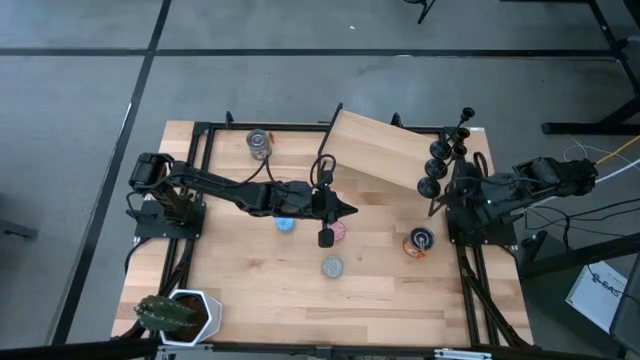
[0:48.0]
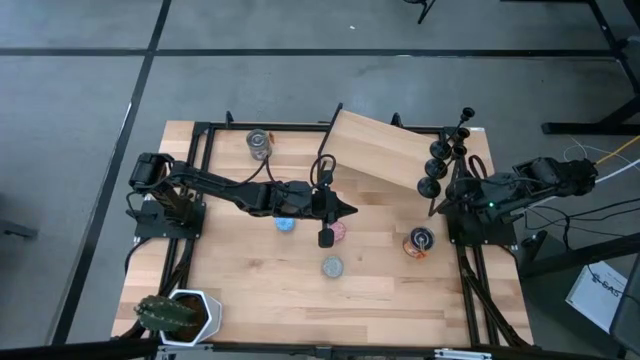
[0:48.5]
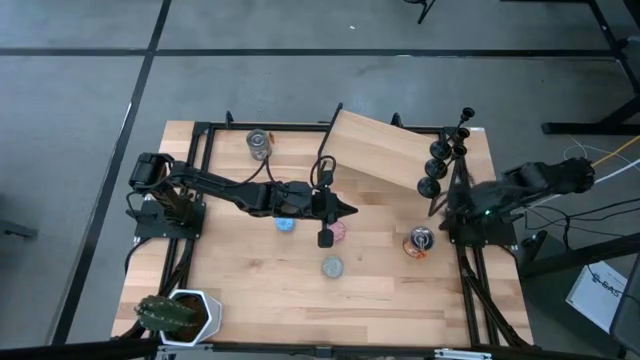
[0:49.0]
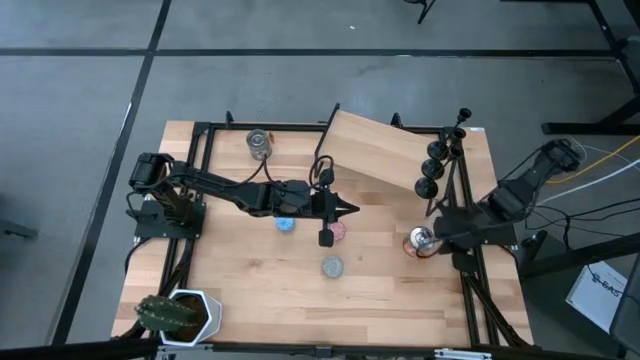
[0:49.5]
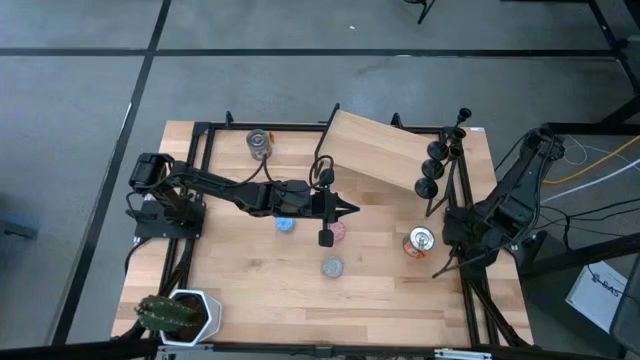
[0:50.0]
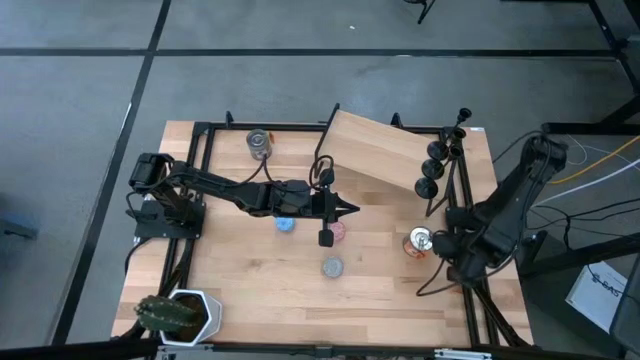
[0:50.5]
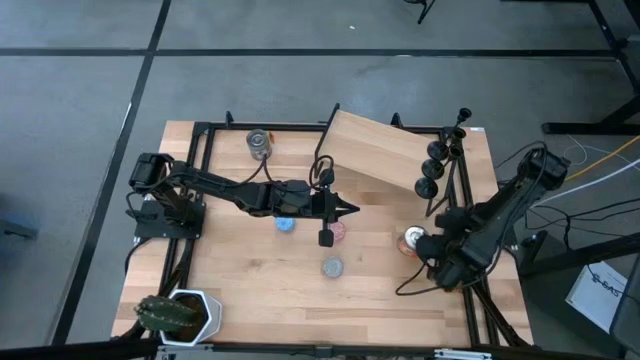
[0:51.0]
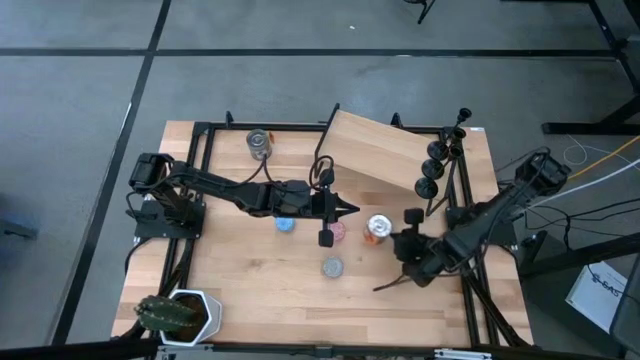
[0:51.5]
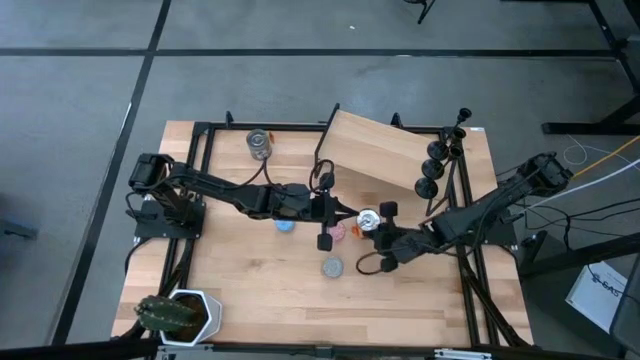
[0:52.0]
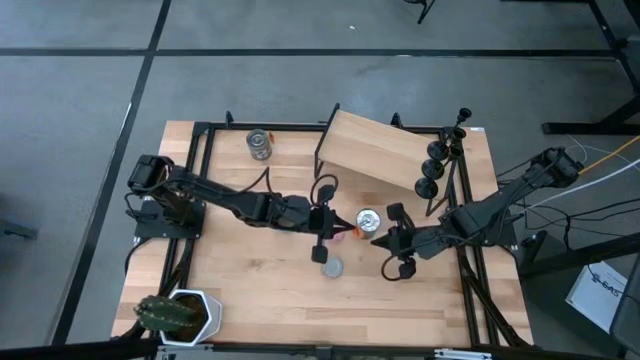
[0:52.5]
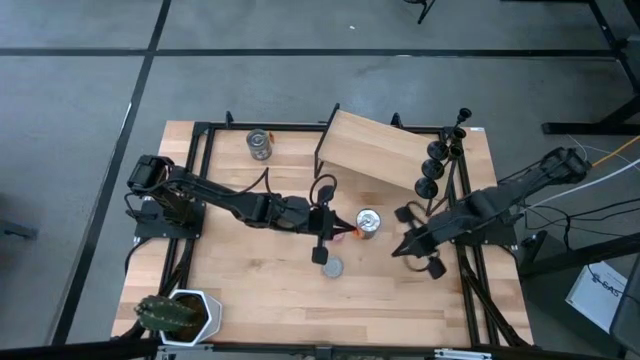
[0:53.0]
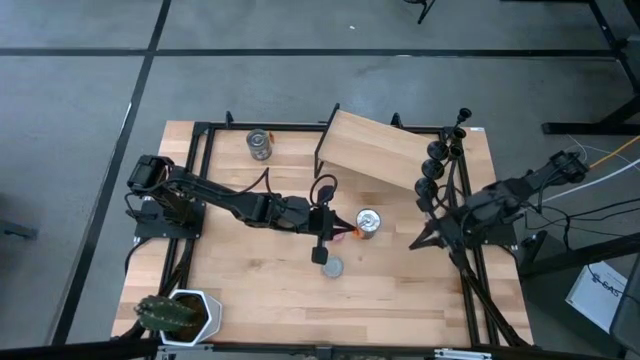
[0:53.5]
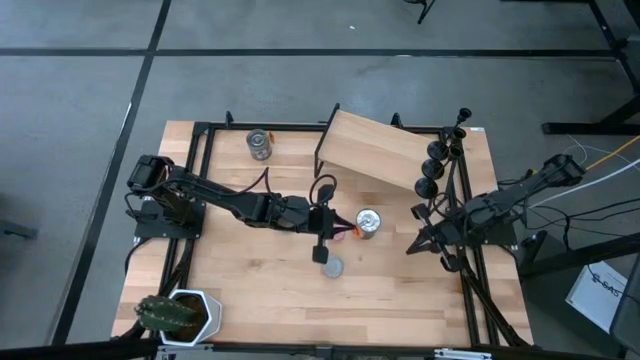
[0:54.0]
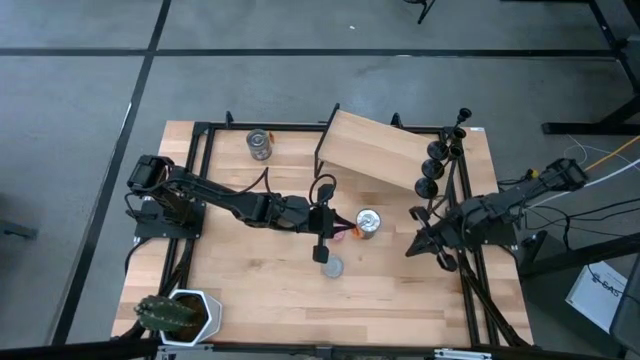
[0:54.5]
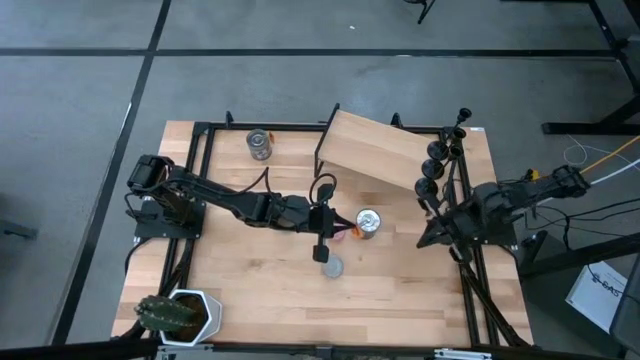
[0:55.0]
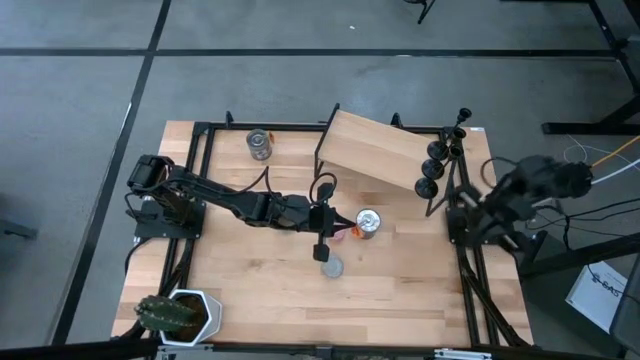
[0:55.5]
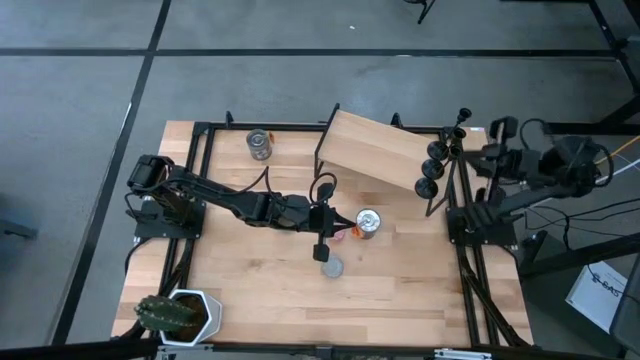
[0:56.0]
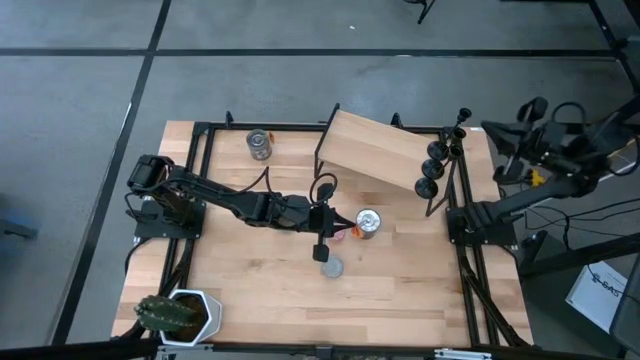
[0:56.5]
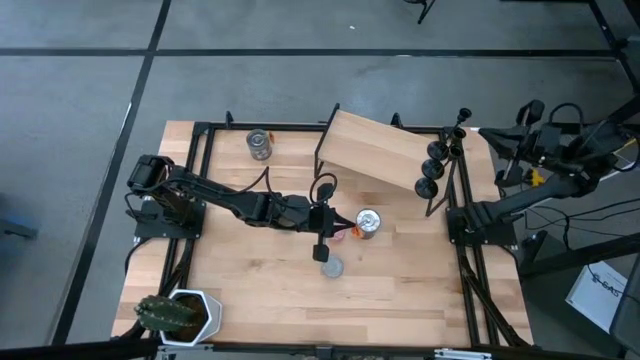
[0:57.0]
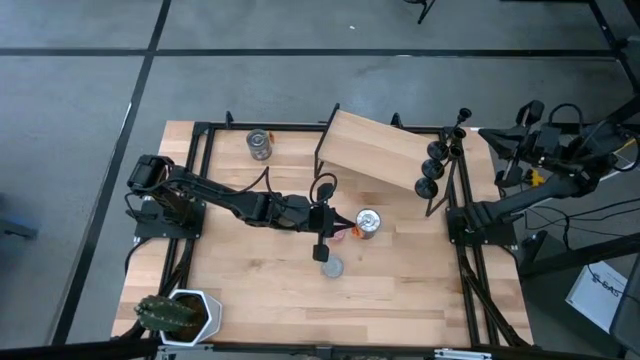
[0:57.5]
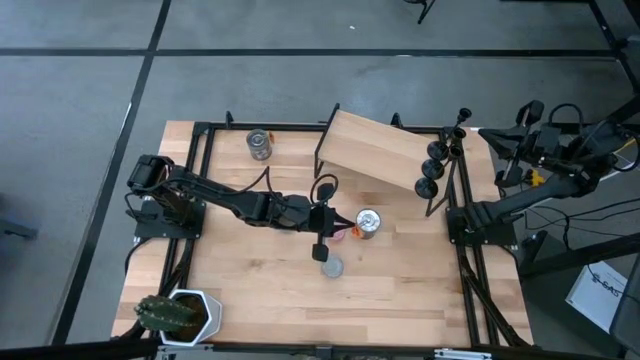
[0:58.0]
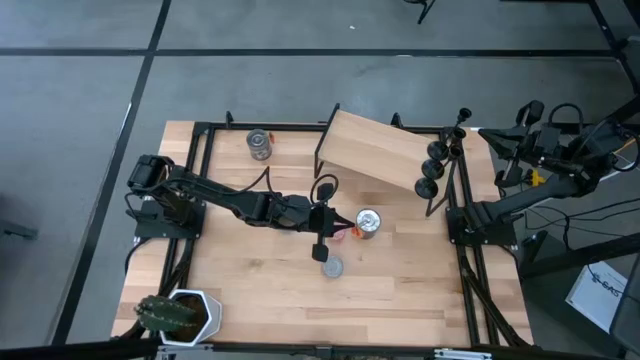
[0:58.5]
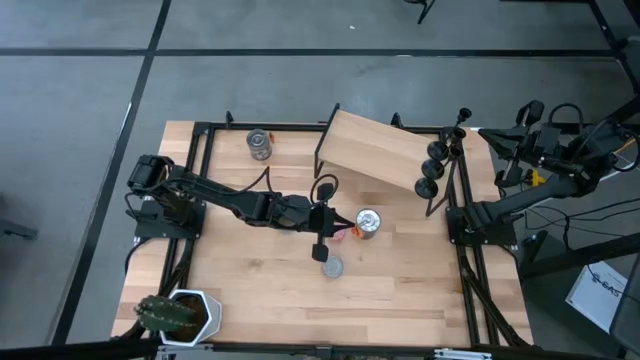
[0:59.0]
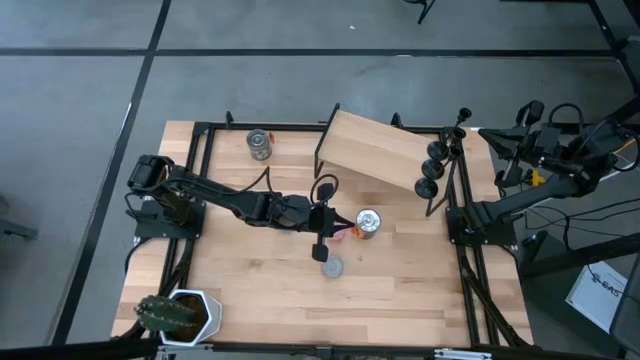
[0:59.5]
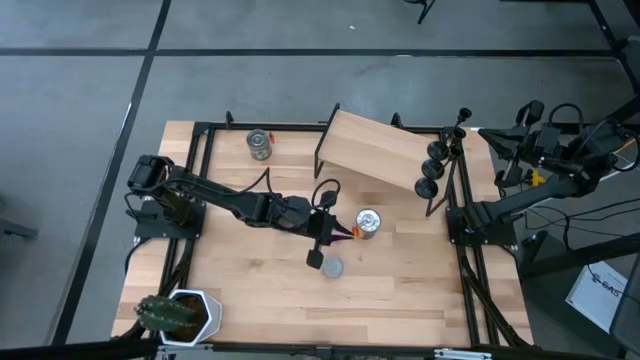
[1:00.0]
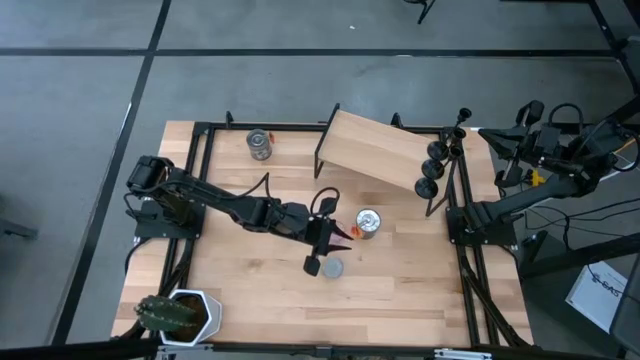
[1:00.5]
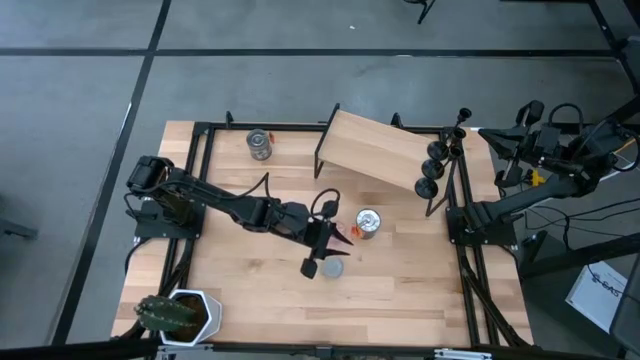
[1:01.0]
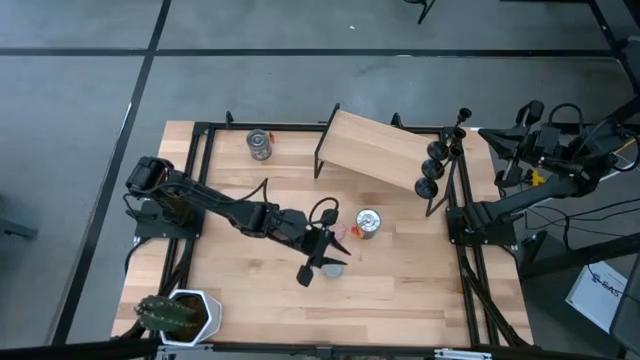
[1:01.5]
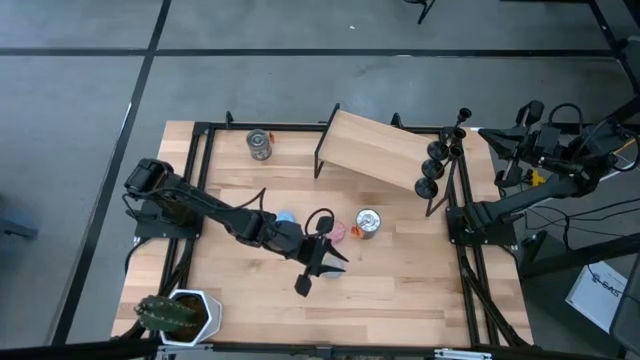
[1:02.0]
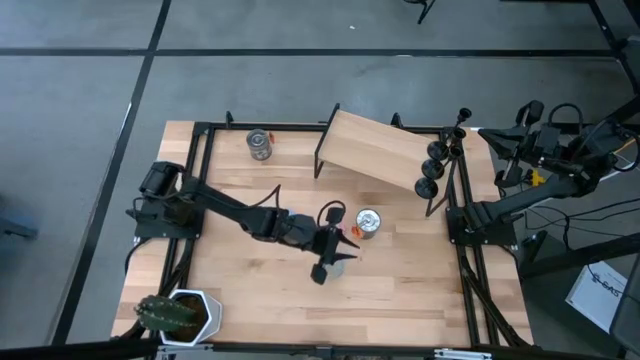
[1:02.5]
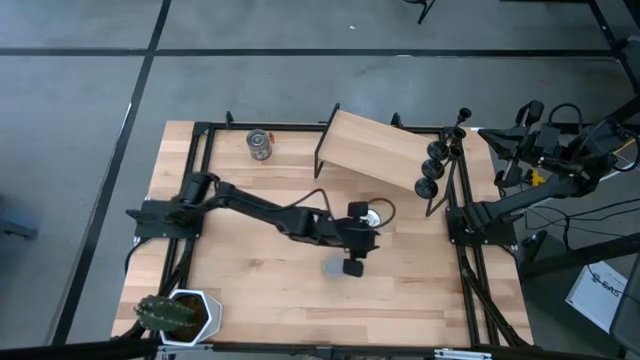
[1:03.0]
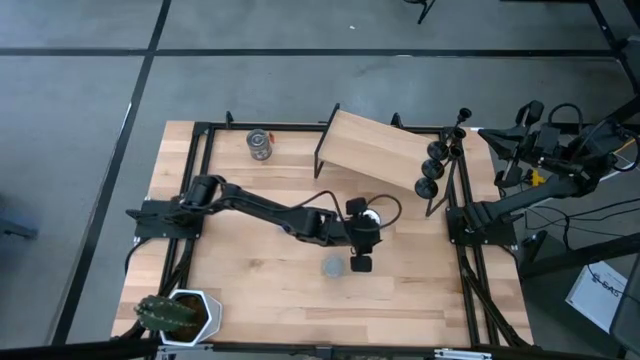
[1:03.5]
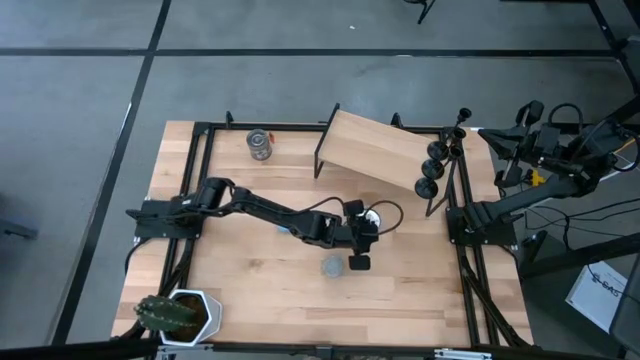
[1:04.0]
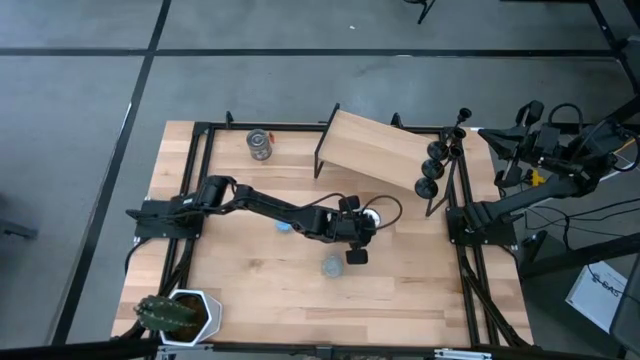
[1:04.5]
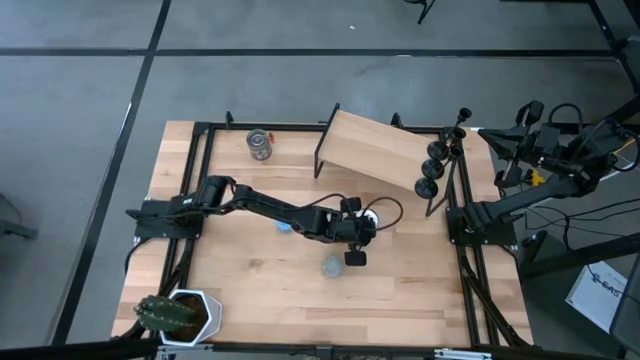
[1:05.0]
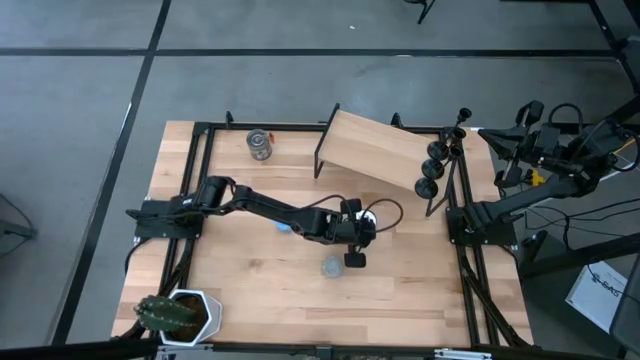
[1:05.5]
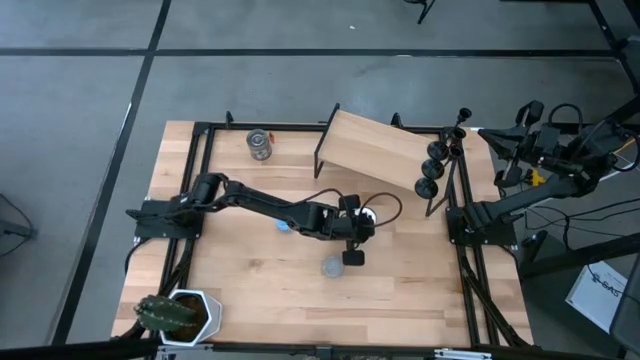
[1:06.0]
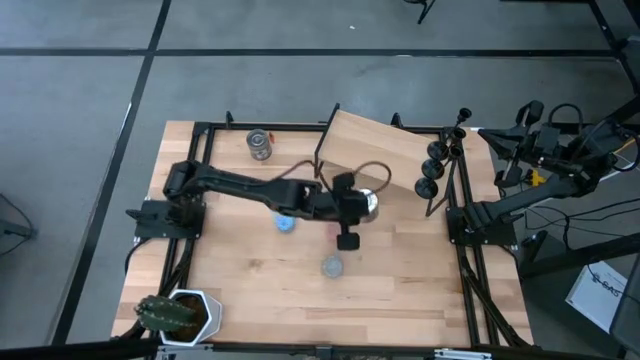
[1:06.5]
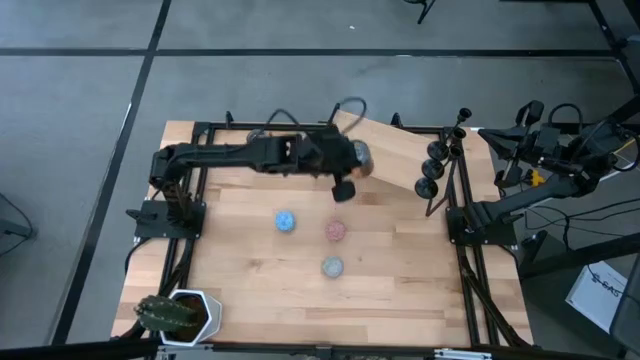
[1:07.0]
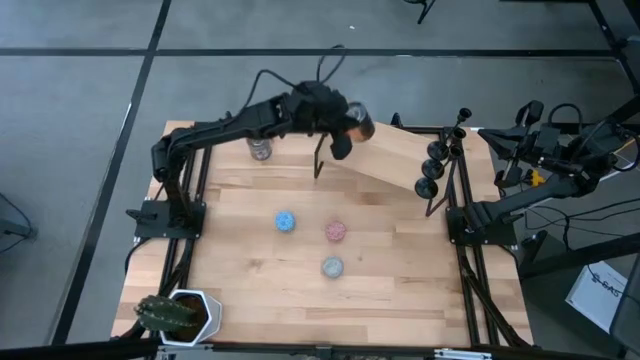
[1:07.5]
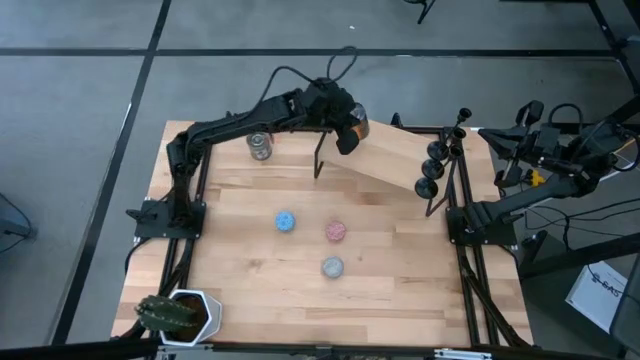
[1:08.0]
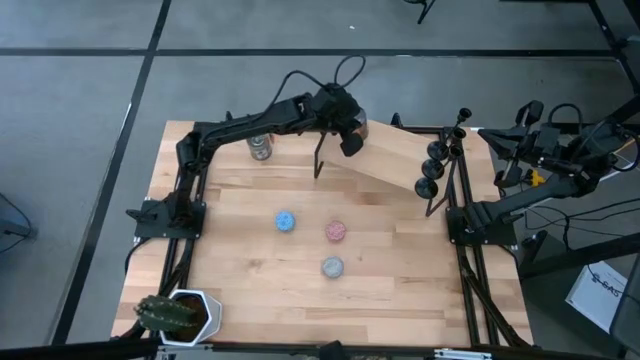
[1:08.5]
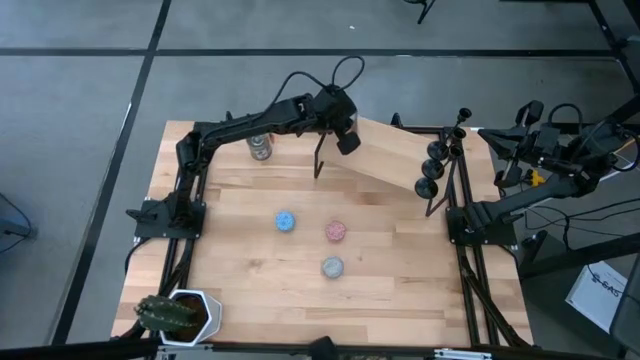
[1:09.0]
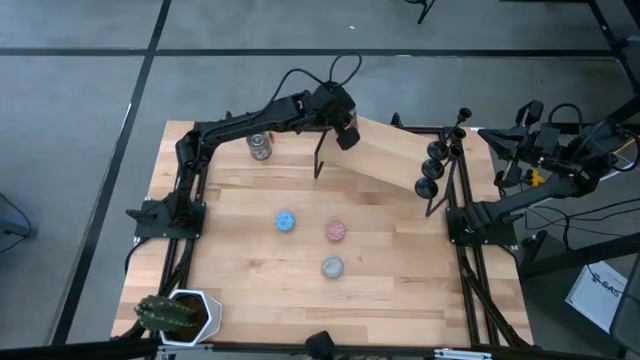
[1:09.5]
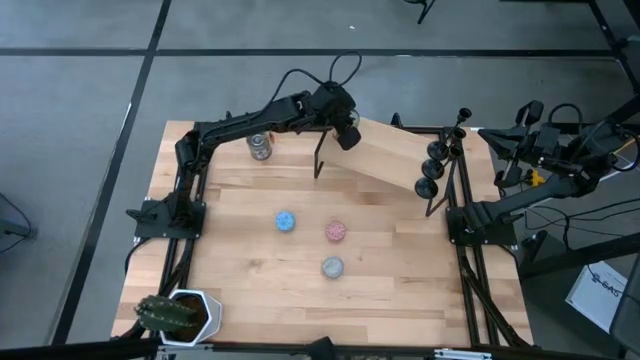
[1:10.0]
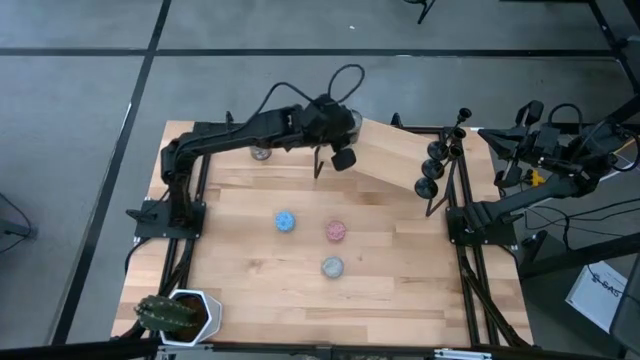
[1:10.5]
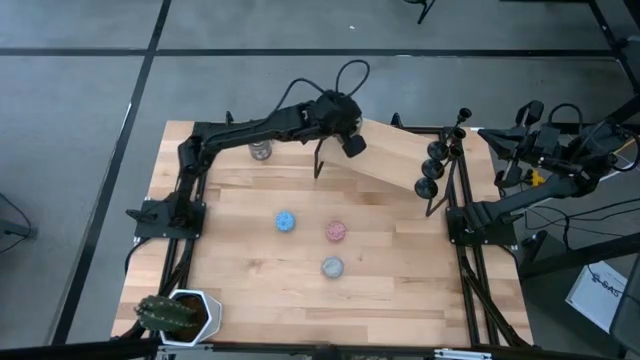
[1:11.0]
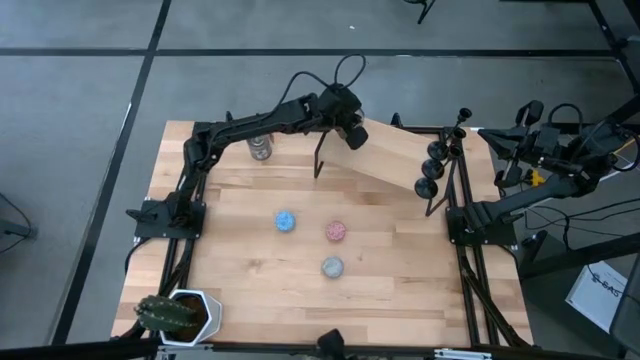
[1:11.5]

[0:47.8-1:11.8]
Task: Pick & Place candle stick holders
Put the bottom silver scented candle on the shelf
